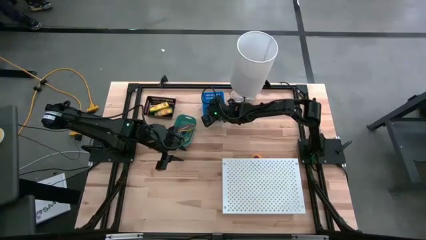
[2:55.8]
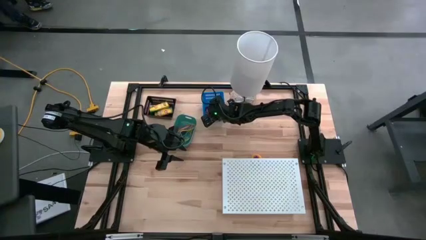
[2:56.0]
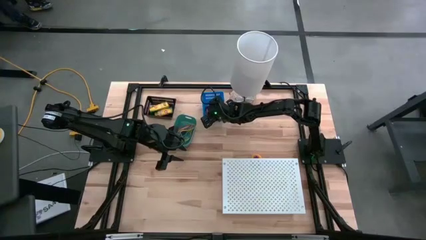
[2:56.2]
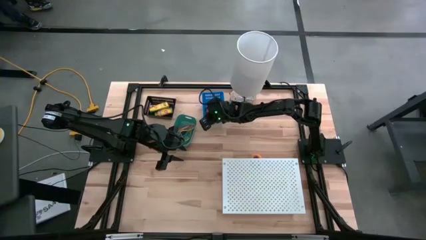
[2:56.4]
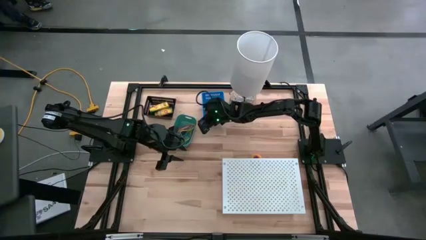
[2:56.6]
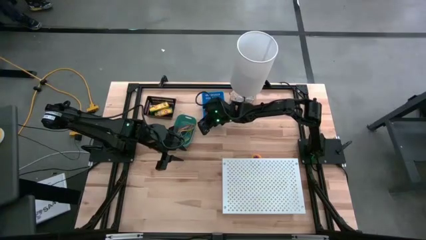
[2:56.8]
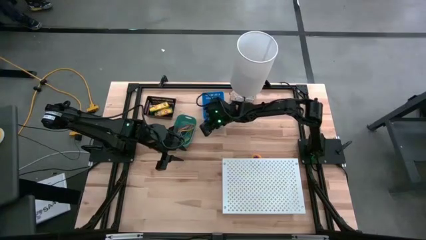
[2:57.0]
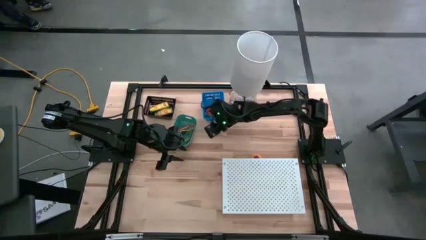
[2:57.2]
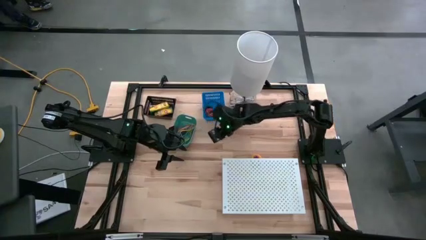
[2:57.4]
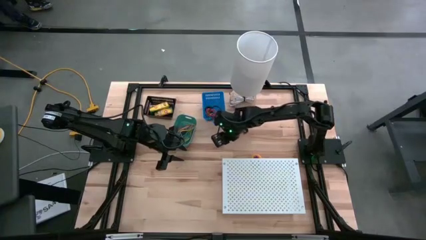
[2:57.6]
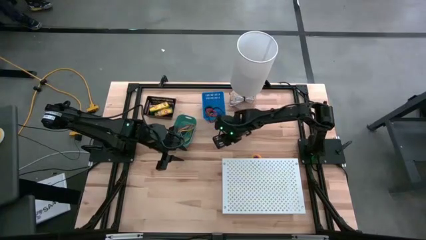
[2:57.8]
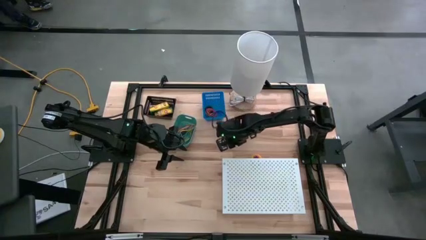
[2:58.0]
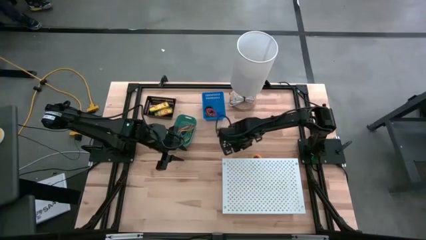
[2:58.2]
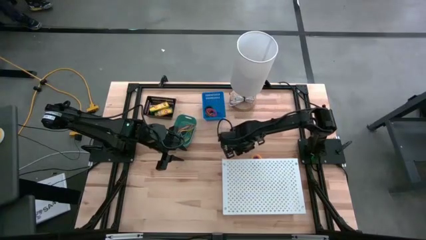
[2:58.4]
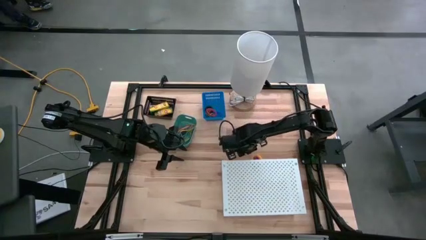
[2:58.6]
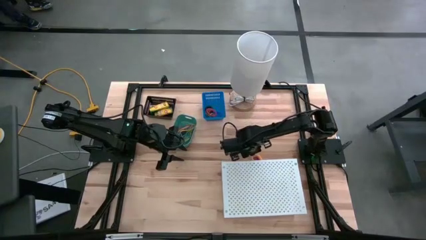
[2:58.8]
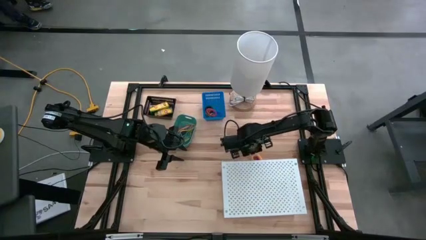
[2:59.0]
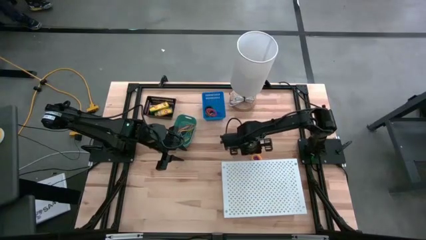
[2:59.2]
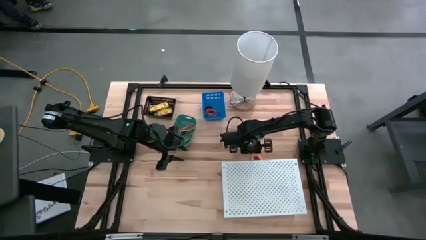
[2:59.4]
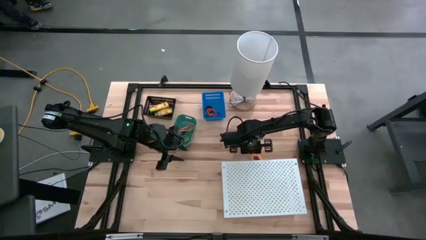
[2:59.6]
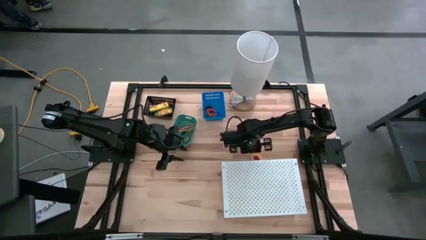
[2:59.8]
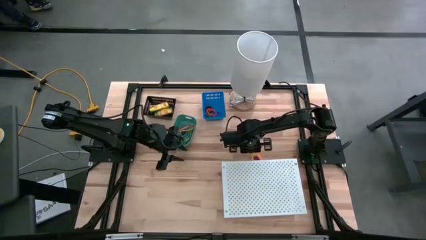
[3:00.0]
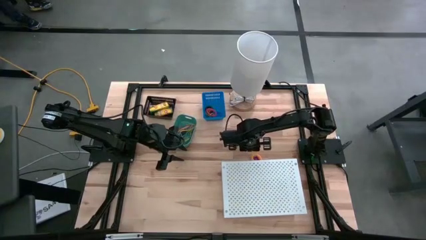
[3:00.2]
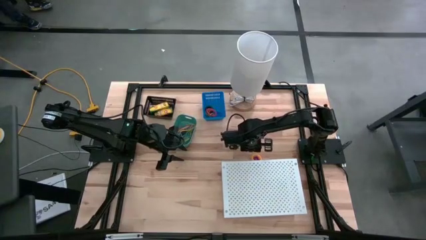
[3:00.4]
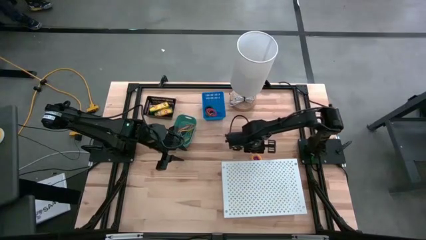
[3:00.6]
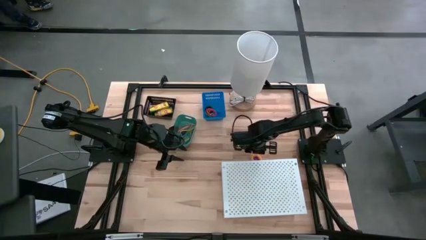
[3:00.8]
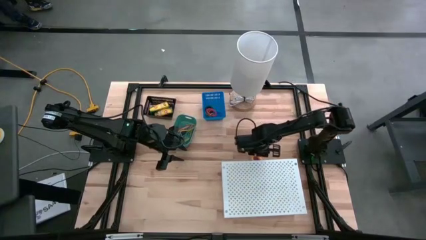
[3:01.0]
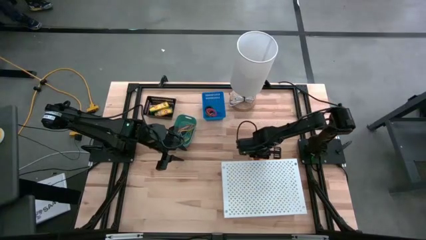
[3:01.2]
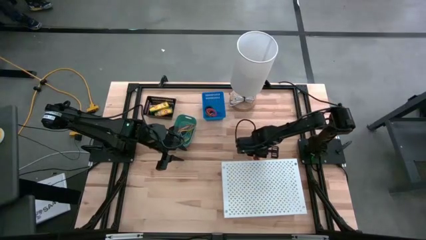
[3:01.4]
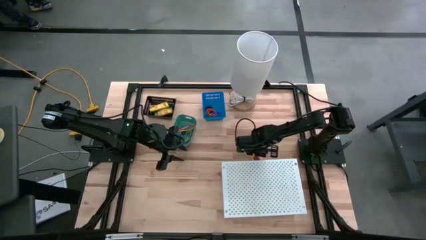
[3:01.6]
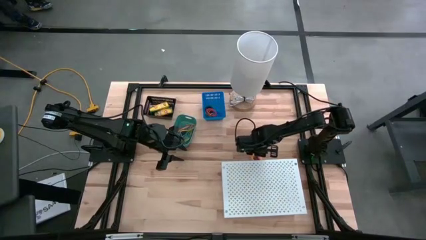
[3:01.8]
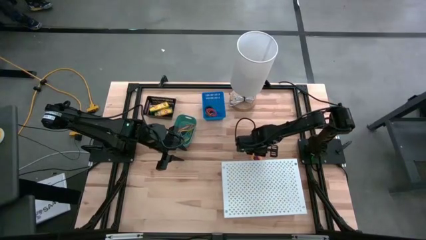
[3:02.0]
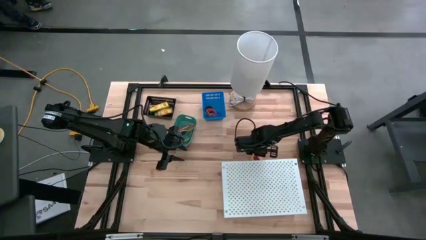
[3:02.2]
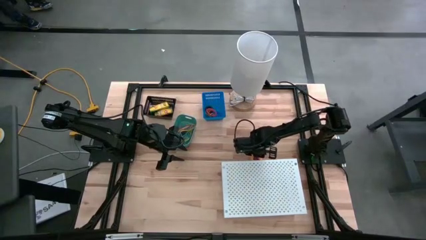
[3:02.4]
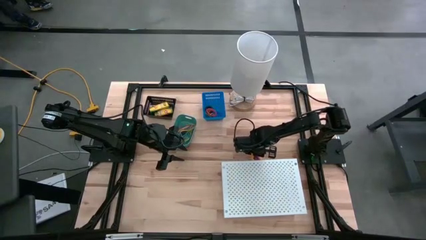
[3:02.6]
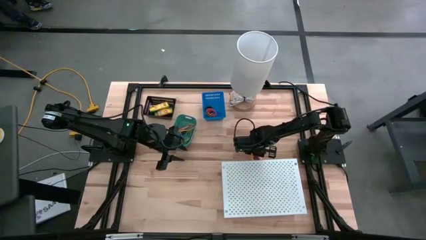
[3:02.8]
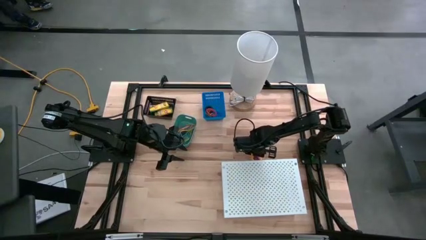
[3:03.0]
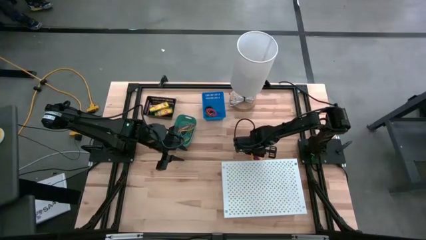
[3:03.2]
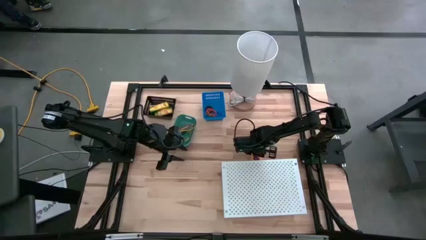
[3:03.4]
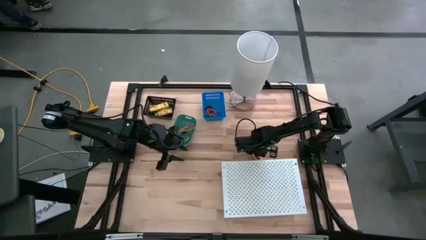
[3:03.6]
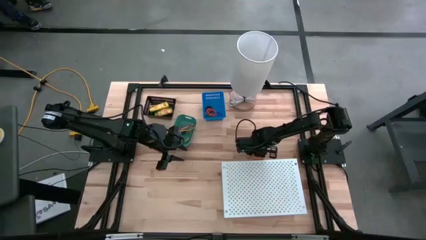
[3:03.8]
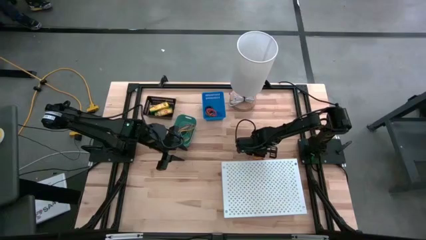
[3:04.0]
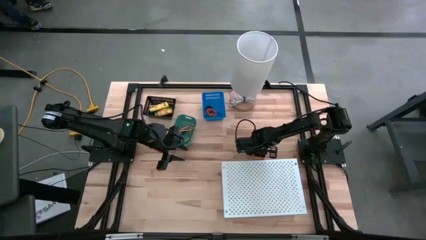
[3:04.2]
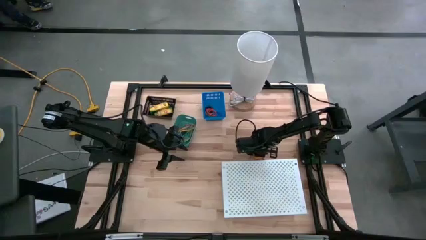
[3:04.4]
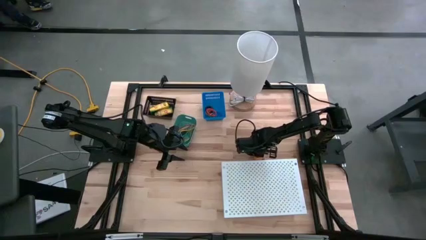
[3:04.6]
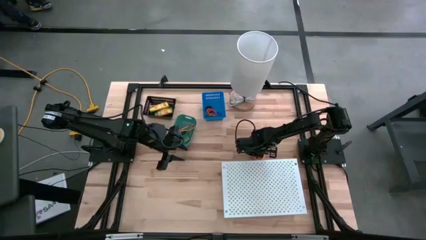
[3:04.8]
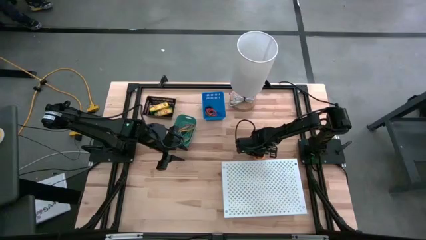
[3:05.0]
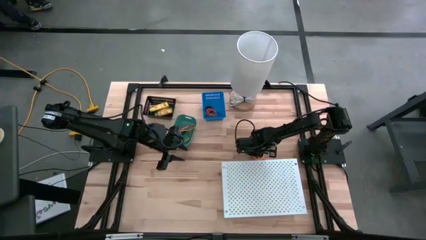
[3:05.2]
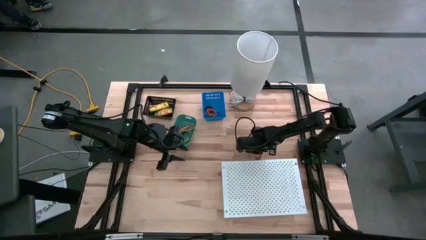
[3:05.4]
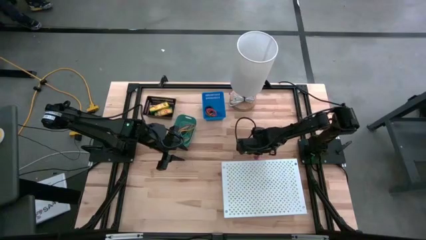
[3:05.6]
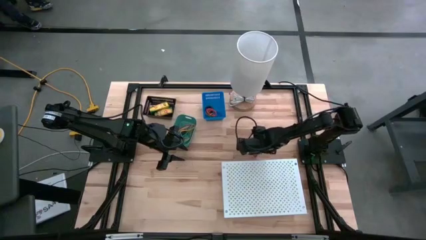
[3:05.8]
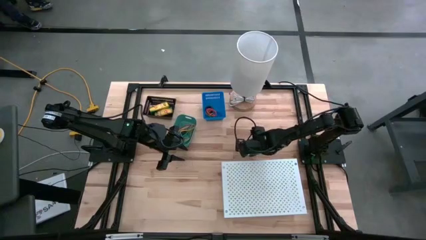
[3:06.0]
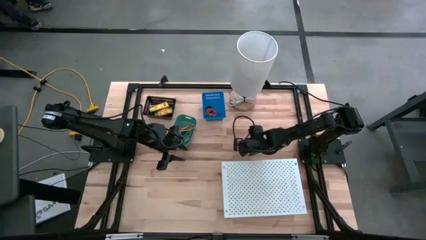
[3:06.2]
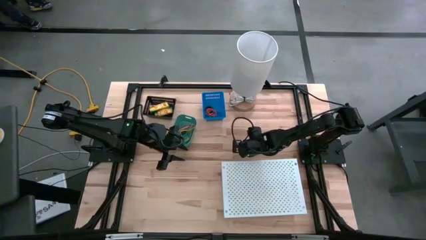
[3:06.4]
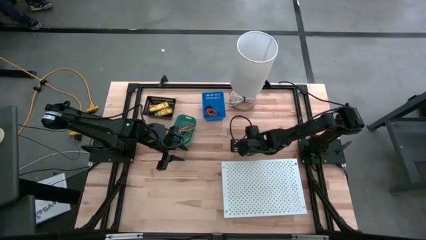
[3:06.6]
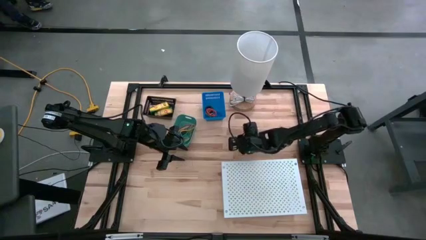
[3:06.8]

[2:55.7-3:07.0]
Task: Pick & Place Office Desk Supplies
Put the purple spring keychain into the blue bin

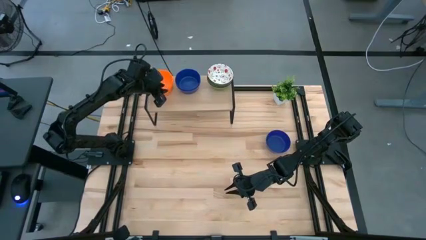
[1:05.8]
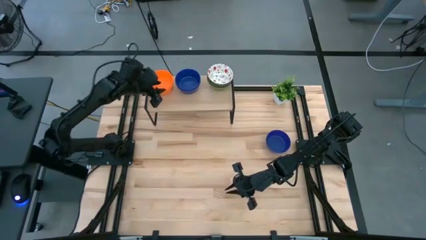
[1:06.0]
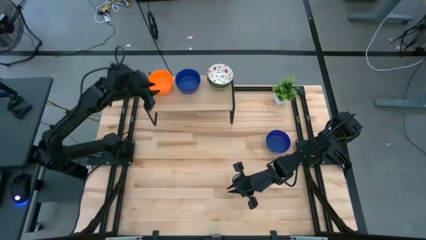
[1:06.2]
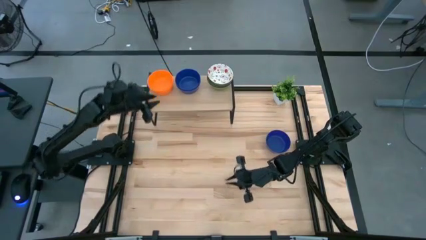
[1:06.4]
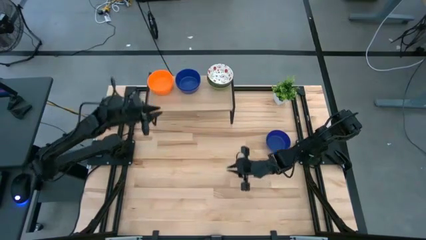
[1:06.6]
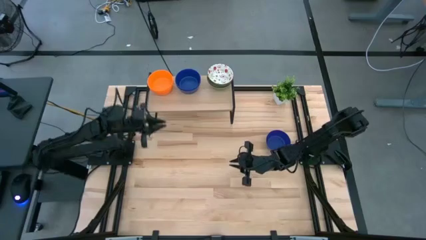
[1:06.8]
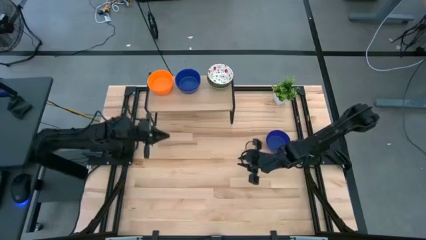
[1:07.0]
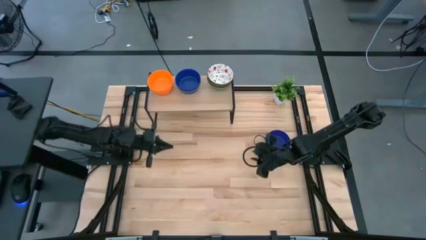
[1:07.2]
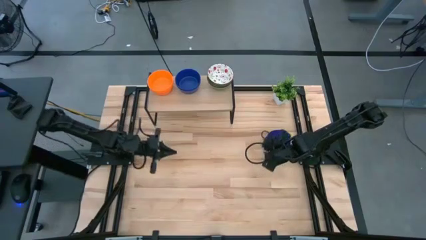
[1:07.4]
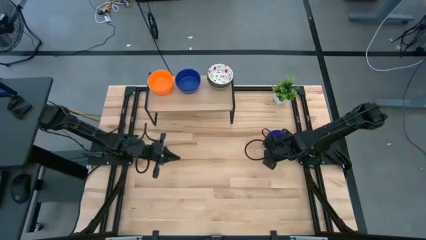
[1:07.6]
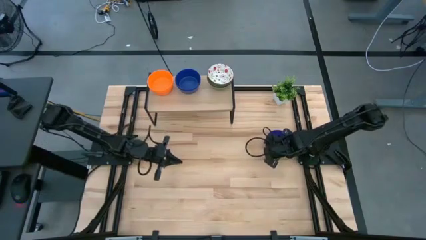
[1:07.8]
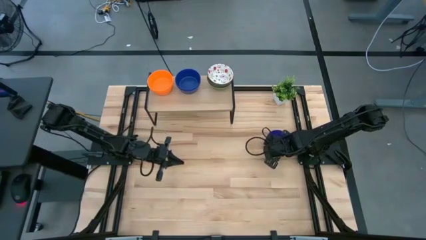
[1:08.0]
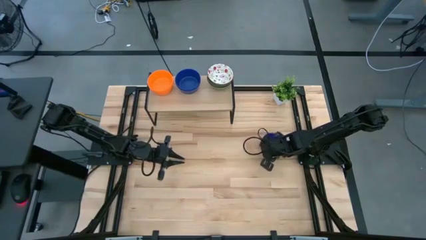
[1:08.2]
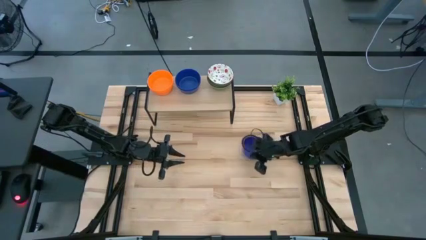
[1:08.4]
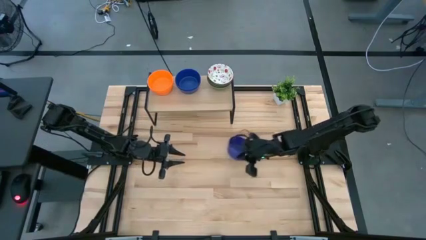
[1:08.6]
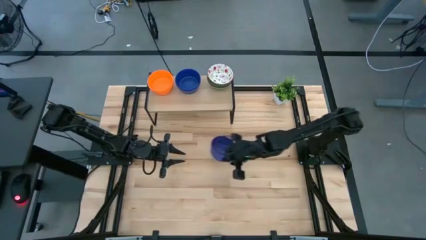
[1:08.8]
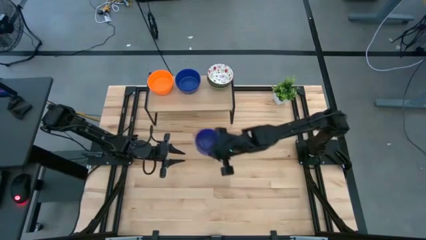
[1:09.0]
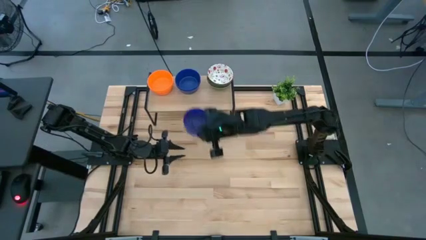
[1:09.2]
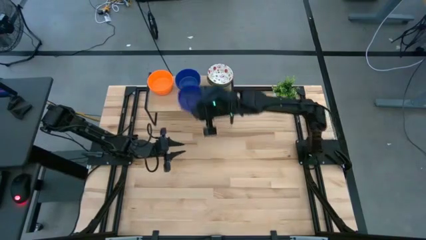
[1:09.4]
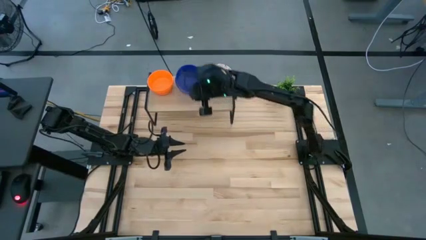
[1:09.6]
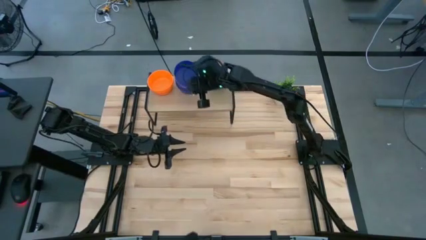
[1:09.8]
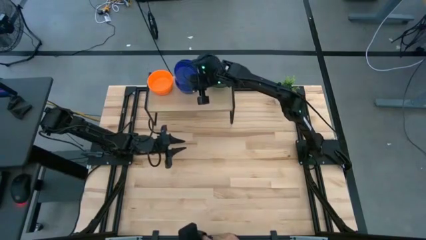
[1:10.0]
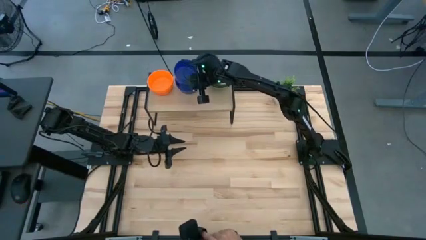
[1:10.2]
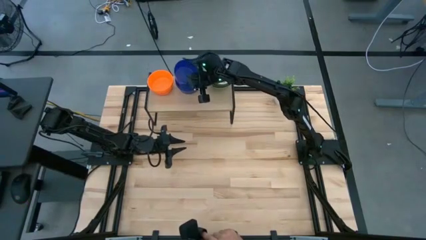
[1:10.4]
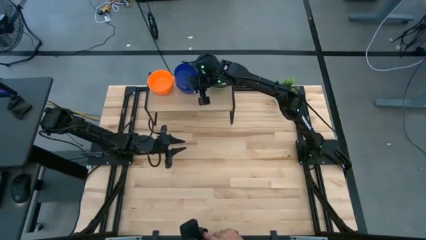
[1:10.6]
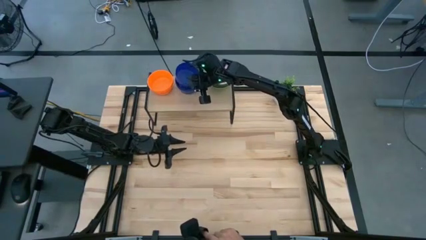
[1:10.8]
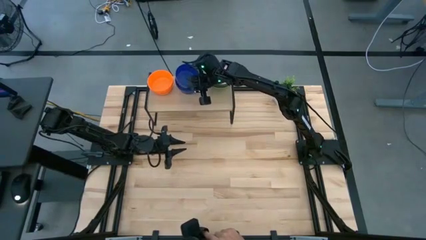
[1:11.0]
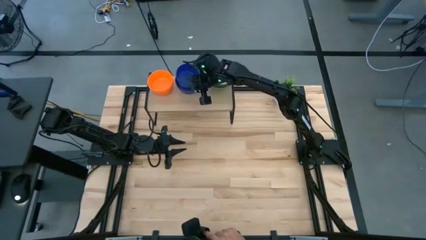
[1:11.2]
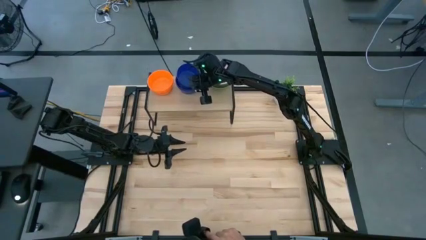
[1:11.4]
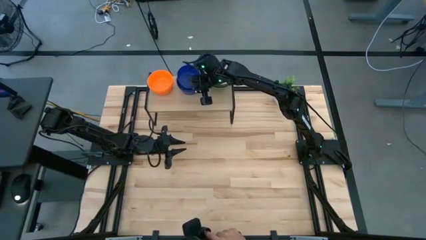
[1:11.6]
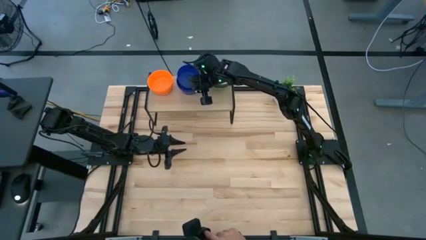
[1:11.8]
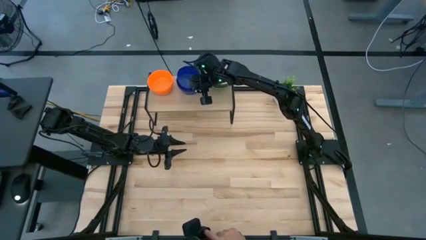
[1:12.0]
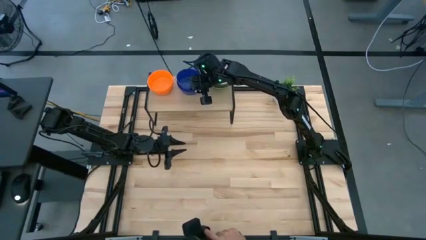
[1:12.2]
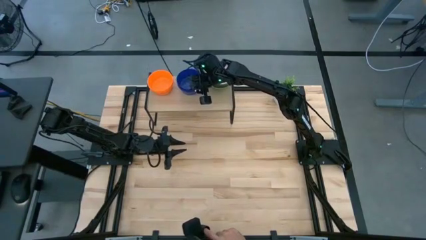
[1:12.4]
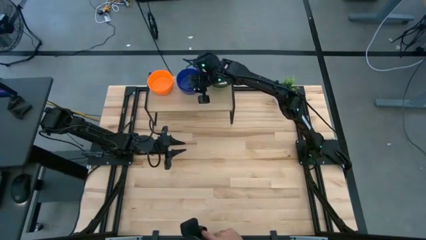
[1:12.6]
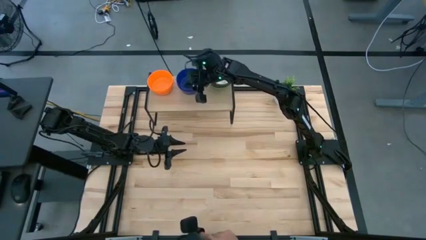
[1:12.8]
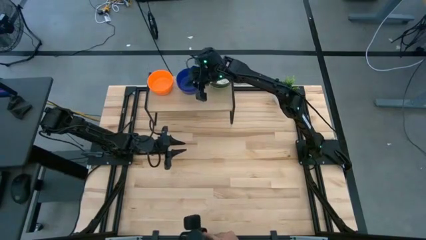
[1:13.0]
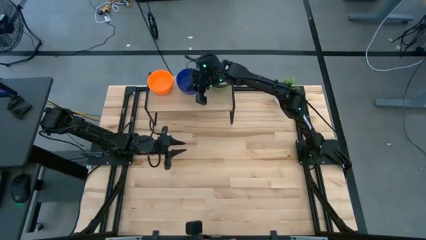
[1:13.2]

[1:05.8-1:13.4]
Task: Pick & Place Mini bowls
Stack the blue bowl on top of the other blue bowls on the shelf
